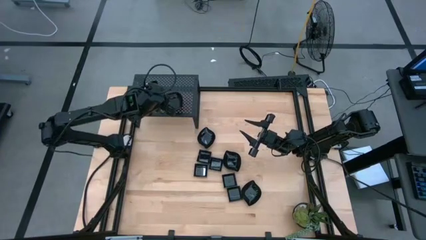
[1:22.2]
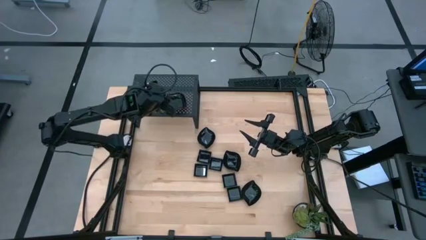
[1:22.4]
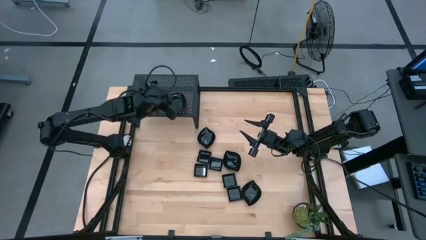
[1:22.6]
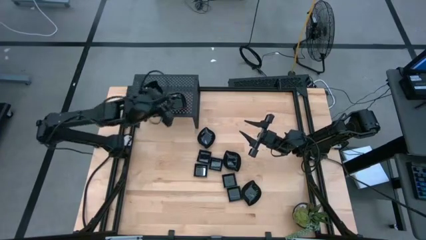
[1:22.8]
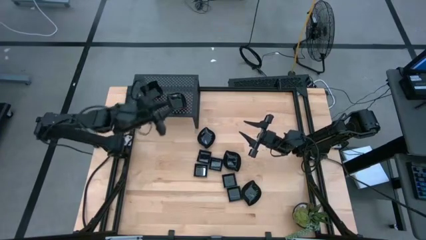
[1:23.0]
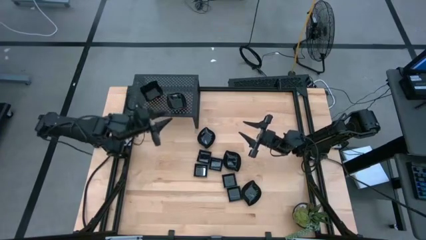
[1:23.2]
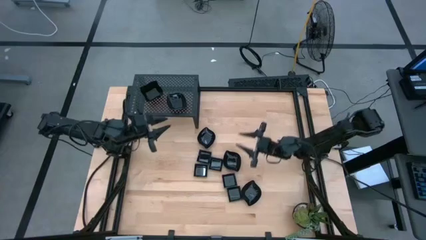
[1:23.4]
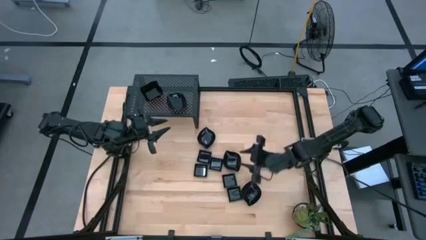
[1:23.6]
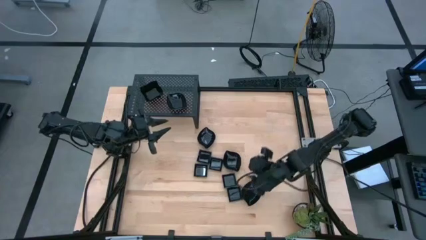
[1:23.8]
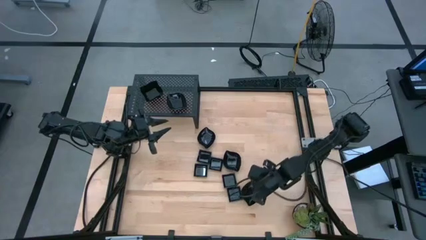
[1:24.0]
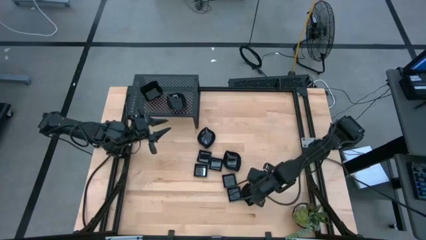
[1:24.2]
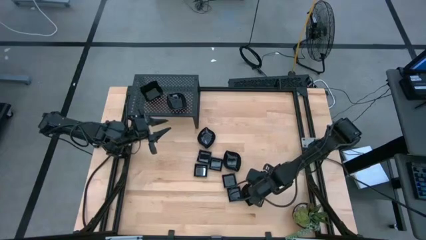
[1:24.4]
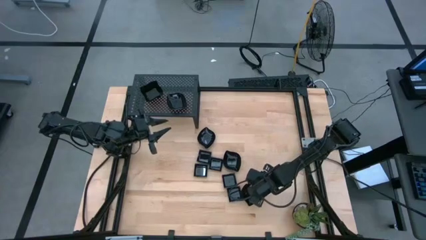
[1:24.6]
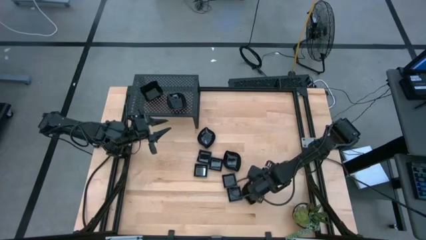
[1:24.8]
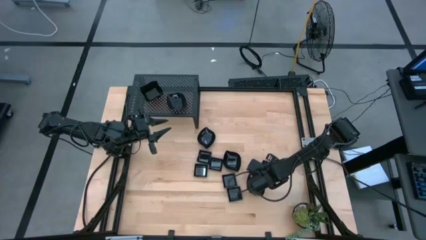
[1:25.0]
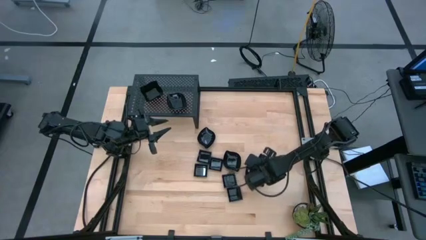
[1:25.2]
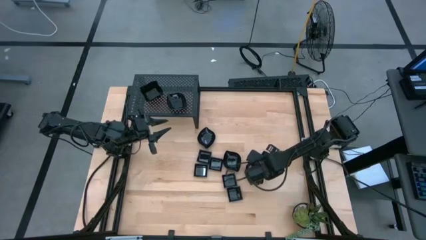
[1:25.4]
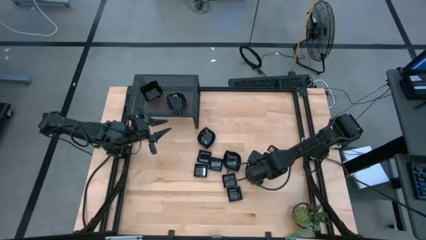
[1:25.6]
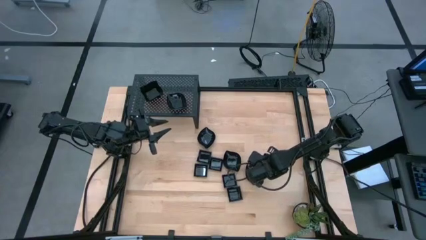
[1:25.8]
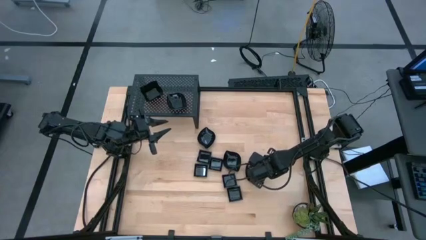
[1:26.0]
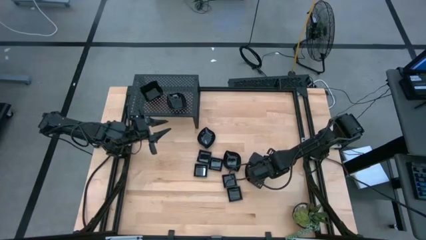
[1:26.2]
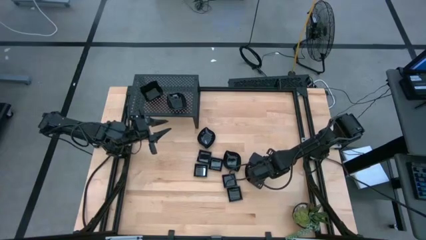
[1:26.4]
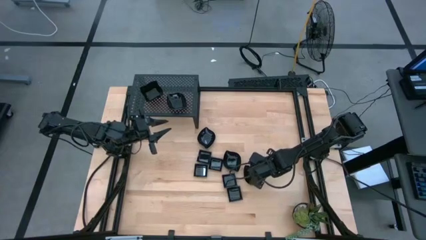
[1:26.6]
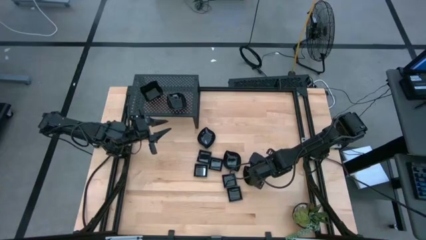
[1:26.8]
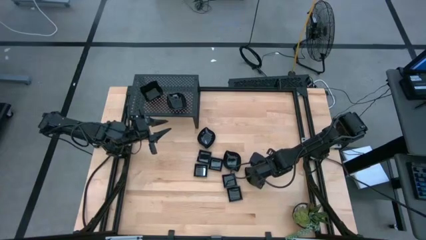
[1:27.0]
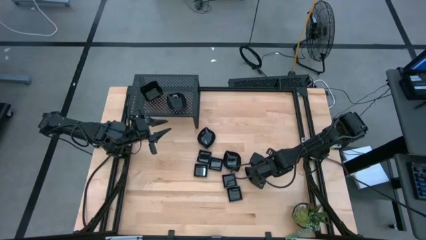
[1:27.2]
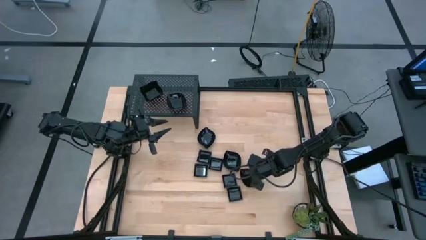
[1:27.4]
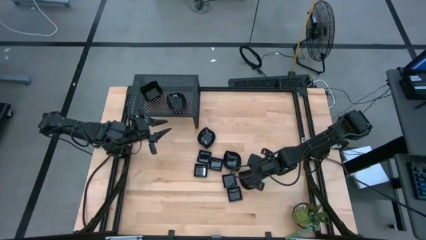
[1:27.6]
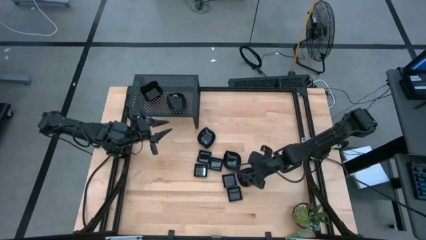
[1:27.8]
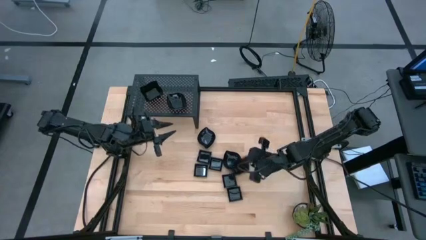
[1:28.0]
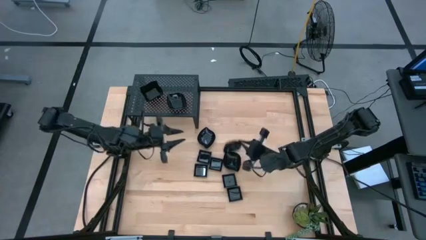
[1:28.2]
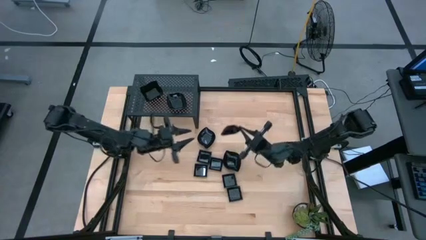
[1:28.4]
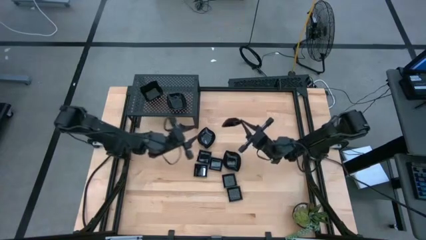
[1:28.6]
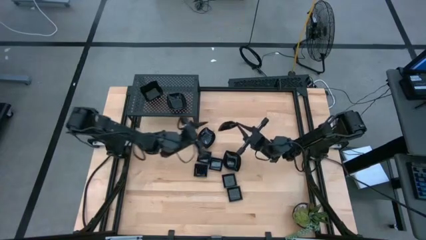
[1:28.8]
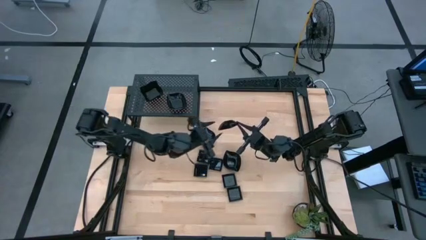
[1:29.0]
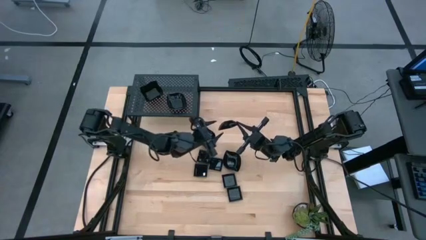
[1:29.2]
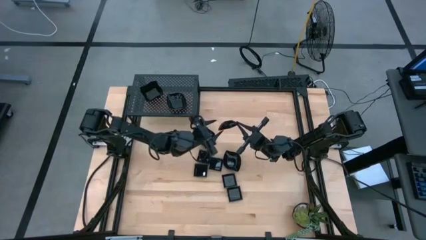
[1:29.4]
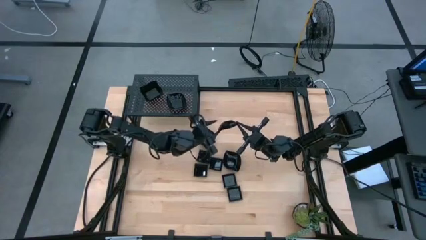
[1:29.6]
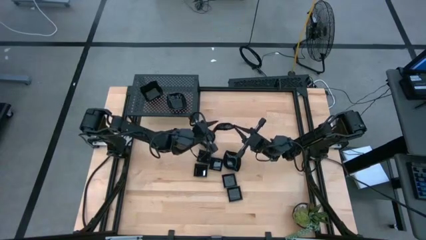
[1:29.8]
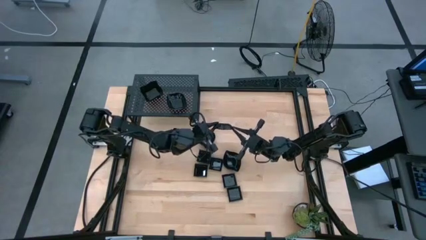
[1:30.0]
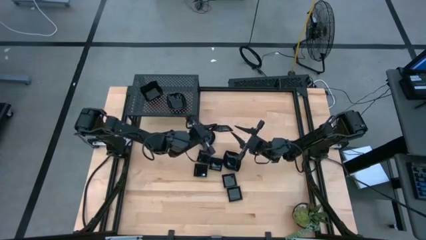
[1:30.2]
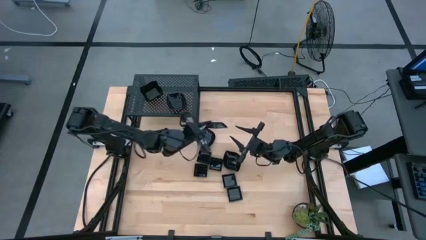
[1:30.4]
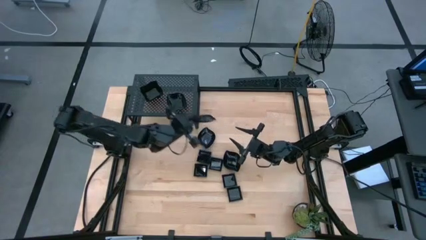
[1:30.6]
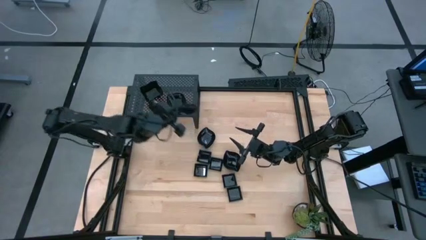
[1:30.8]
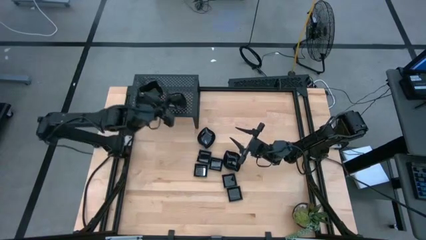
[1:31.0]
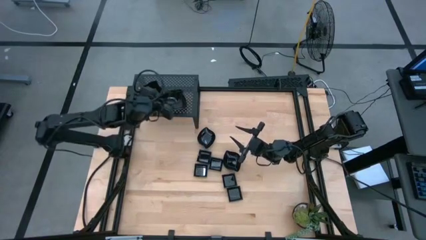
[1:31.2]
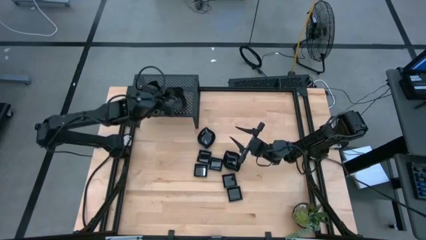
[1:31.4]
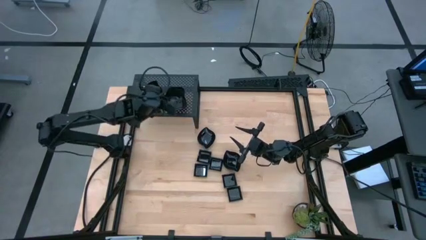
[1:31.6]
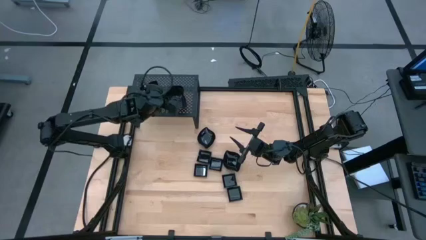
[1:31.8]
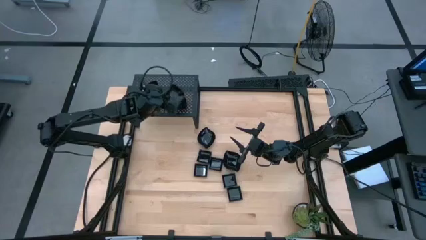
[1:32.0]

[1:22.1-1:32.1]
Task: Pick & Place Mini shaped plates
Stack the leaf shaped plate on top of the leaf shaped plate on the shelf

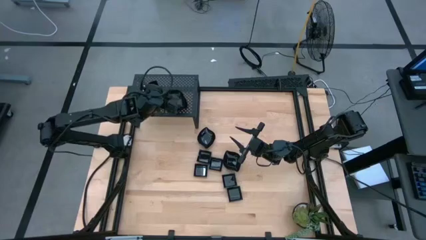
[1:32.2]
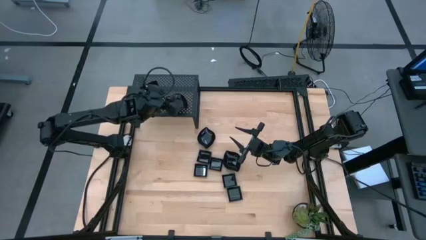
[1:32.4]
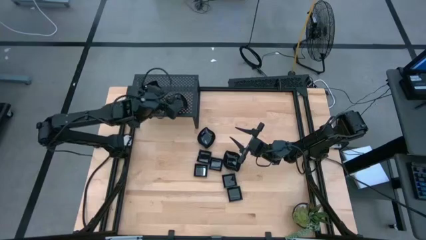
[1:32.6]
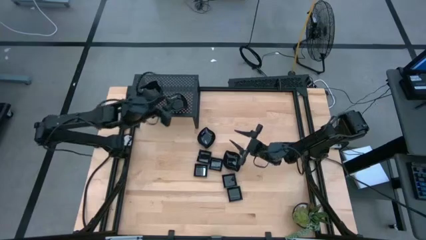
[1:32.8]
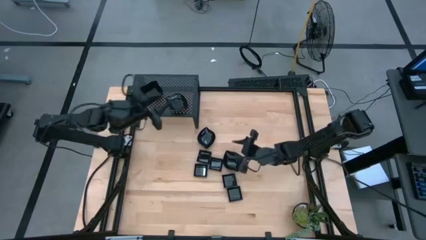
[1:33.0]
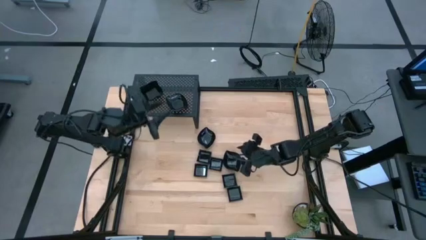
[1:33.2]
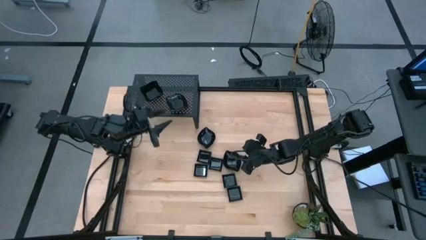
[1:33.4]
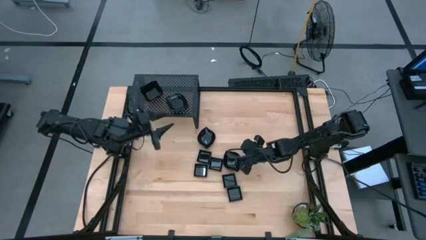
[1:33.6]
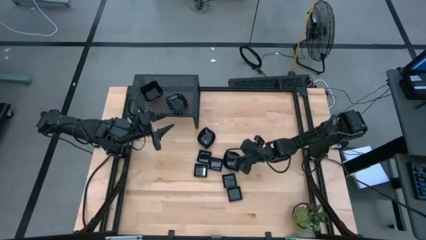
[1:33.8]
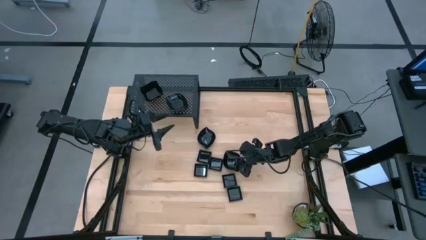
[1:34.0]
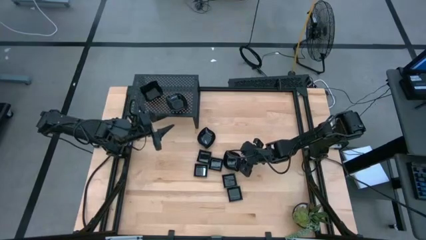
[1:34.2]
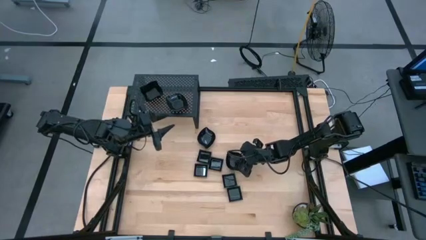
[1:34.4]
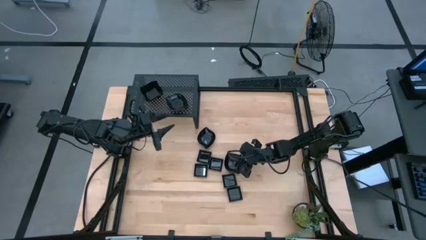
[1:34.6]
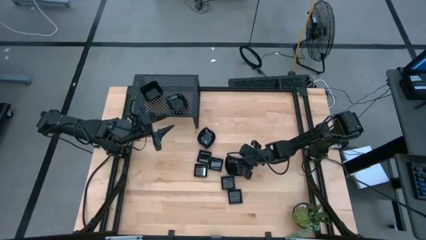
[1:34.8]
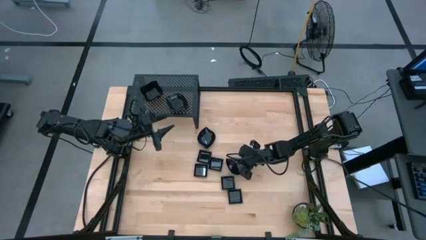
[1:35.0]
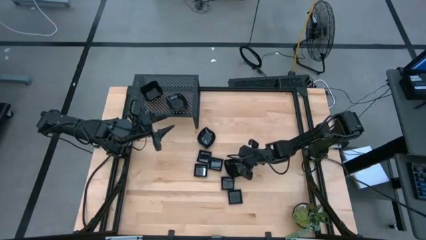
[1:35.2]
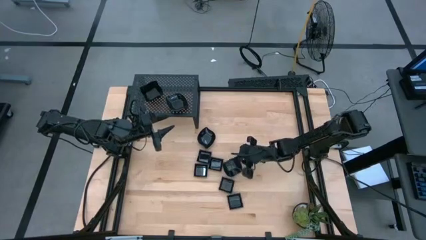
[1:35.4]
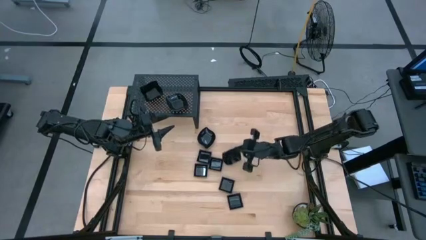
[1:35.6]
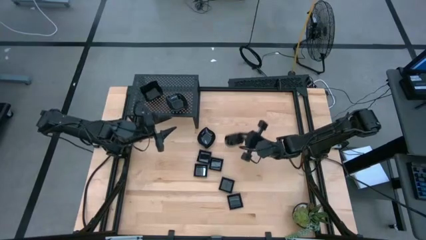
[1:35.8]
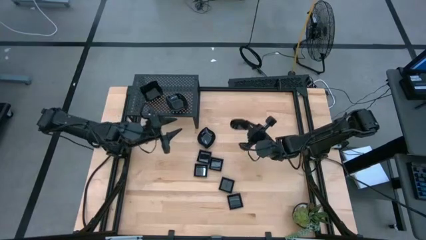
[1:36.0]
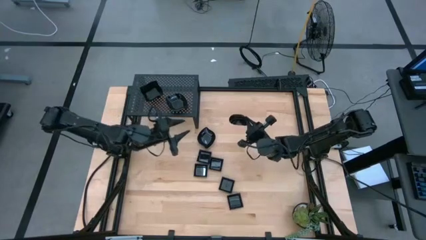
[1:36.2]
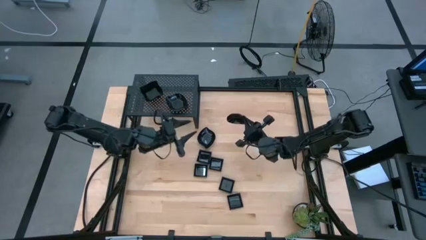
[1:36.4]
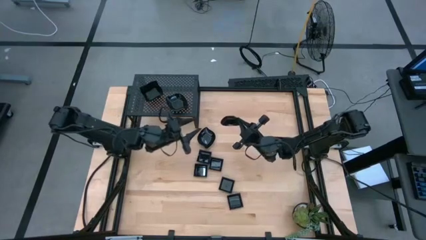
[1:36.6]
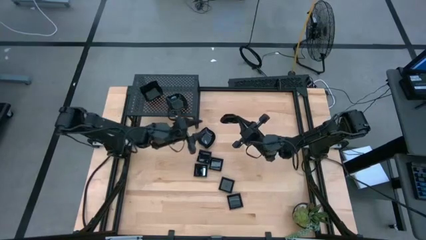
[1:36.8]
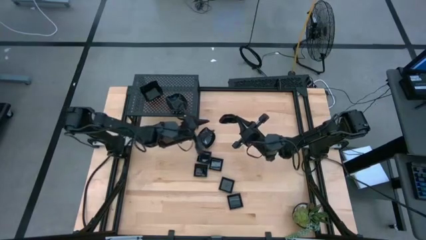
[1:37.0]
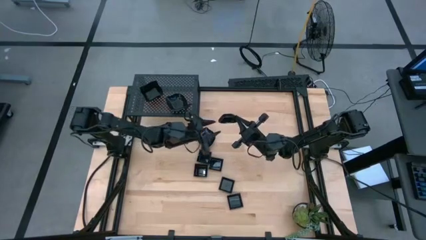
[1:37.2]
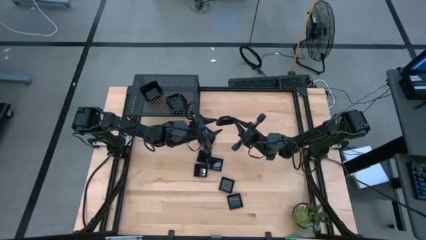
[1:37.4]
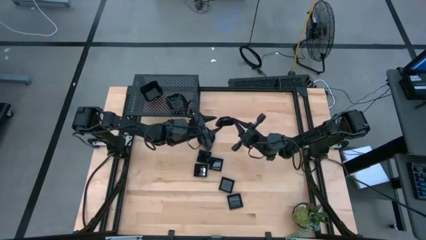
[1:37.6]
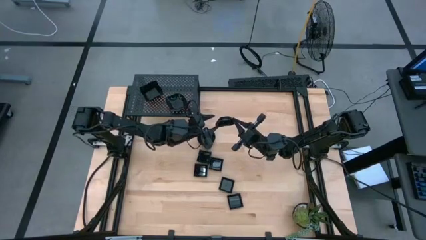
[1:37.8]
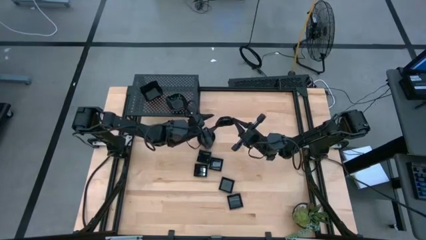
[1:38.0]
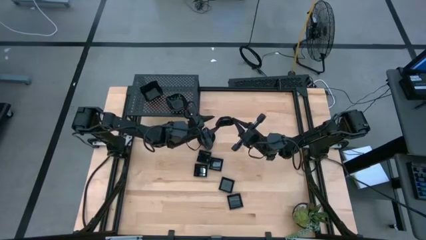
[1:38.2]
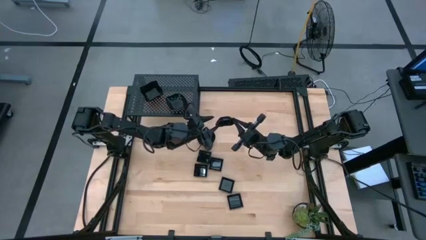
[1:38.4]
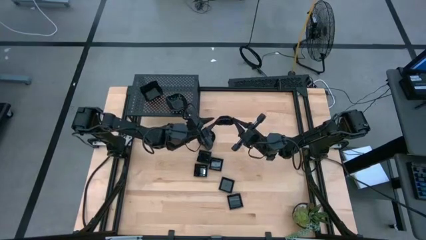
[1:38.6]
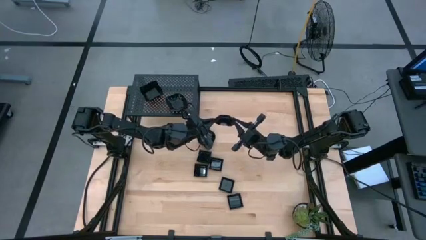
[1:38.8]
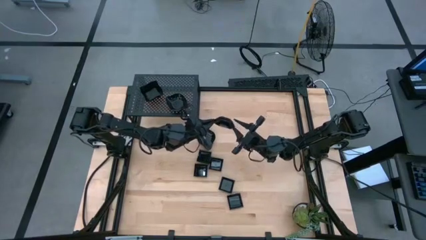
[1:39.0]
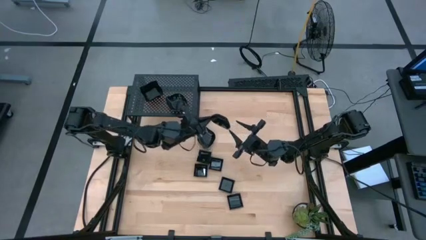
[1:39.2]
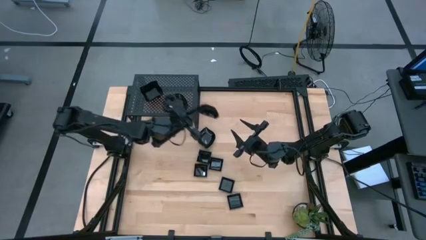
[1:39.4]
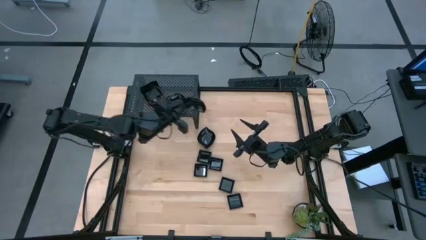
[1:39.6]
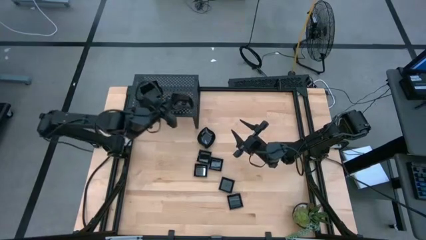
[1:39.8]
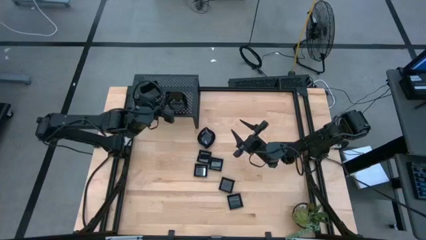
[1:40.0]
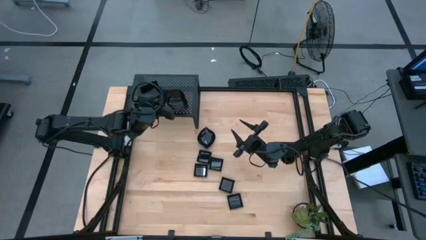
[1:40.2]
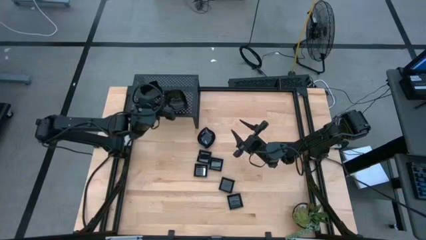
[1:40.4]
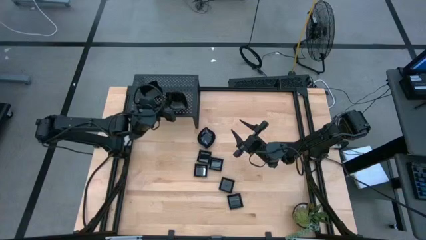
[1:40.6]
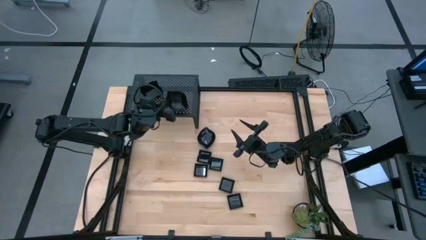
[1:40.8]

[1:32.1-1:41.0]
Stack the leaf shaped plate on top of the leaf shaped plate on the shelf
